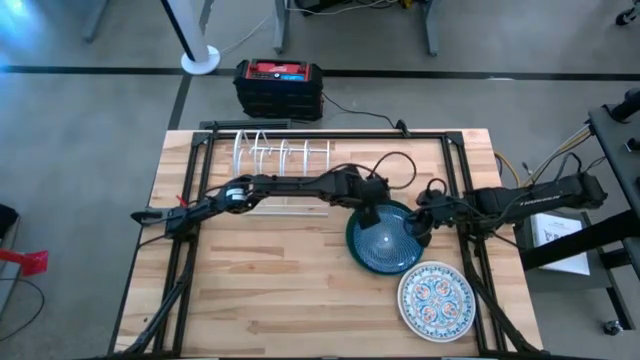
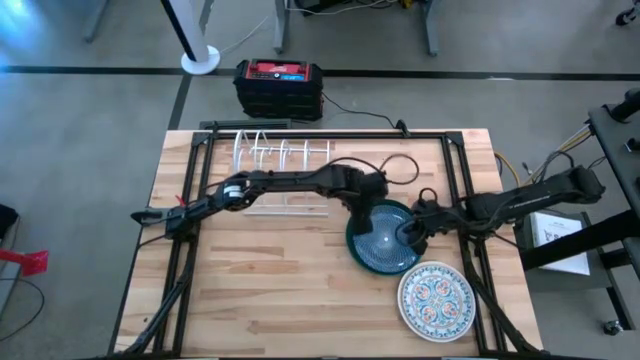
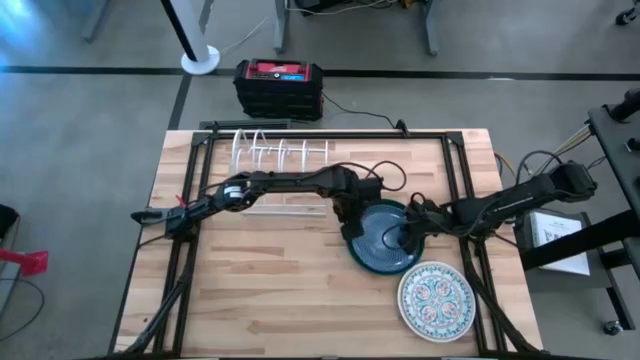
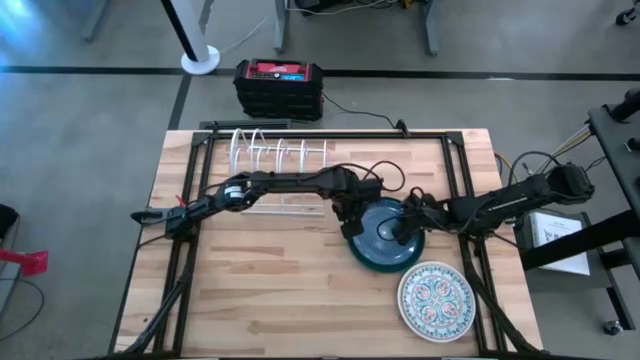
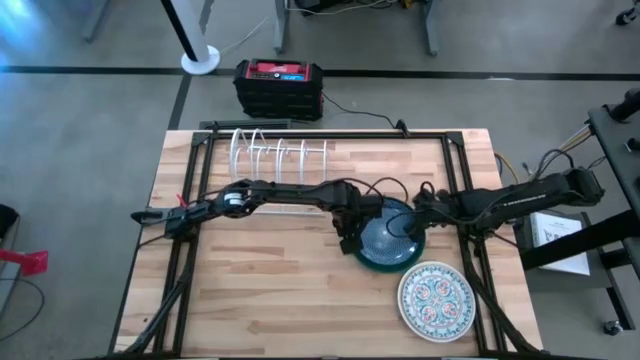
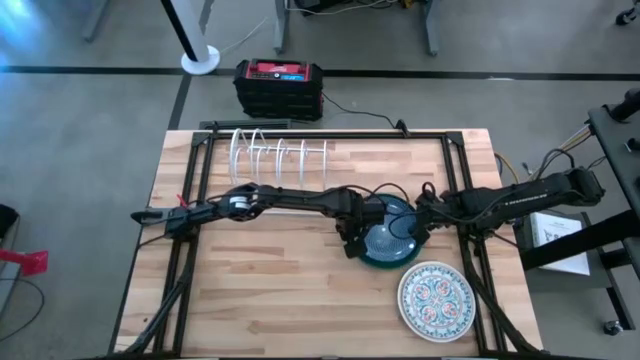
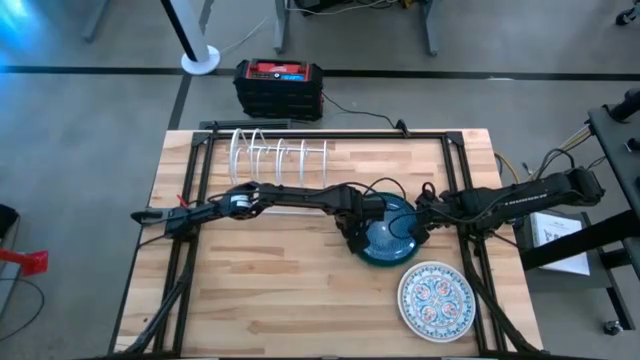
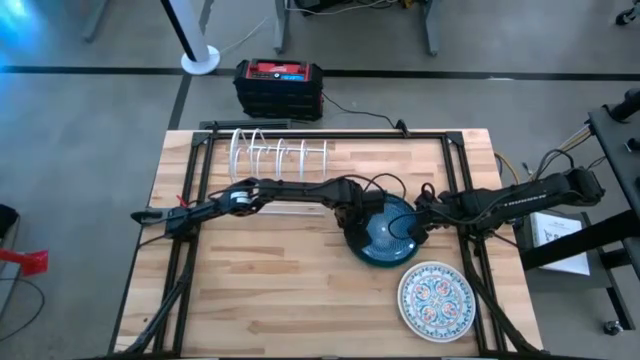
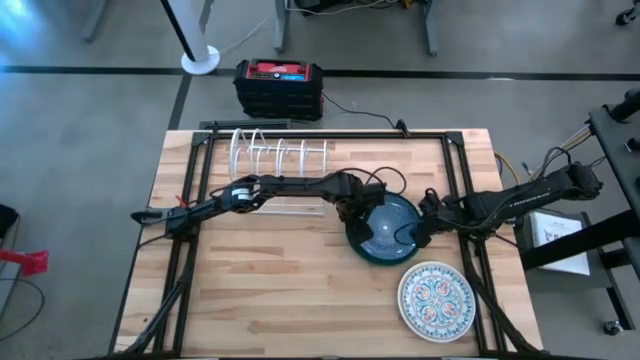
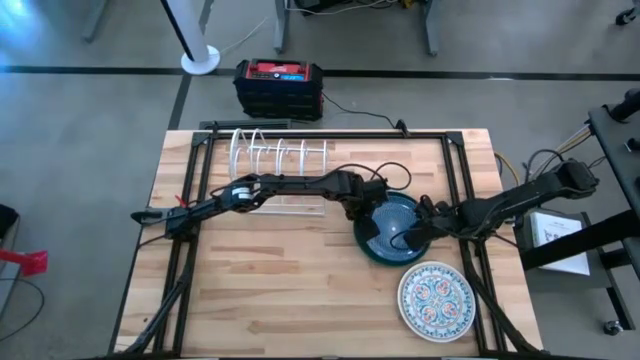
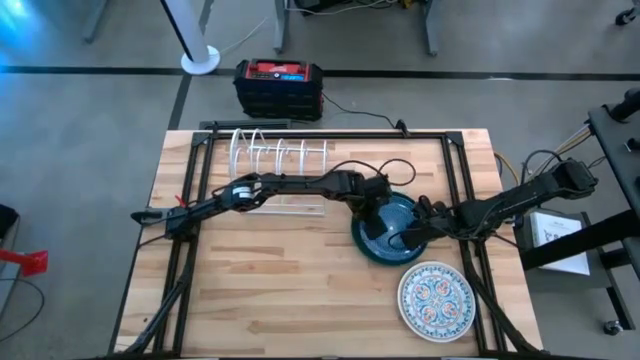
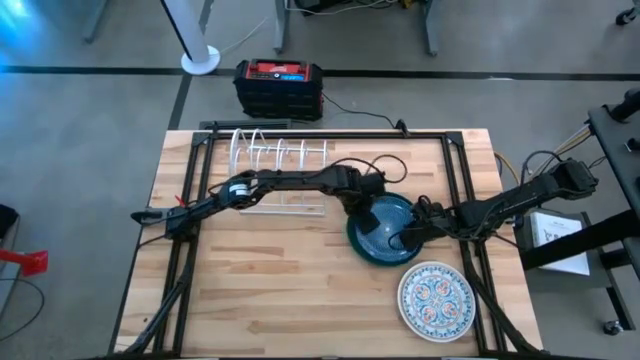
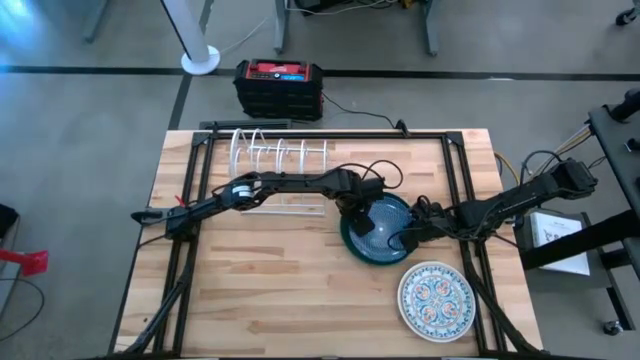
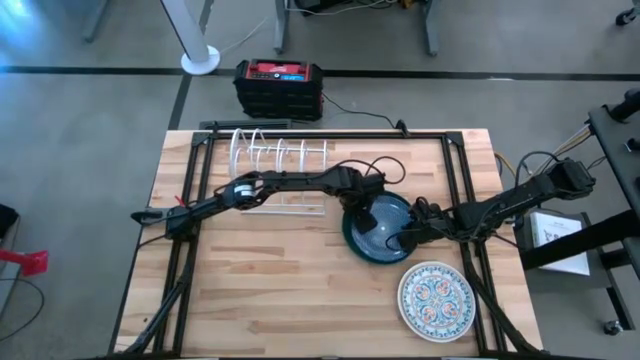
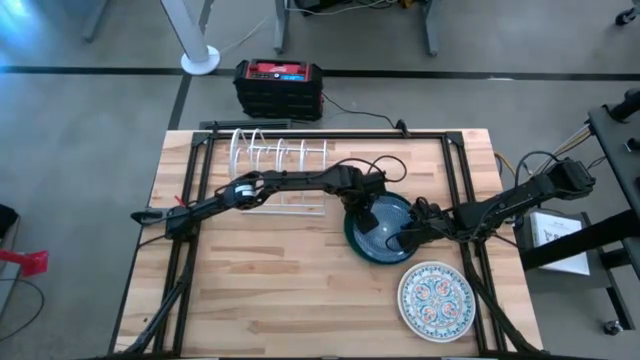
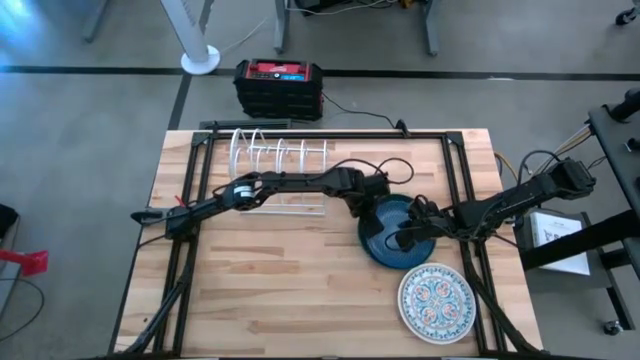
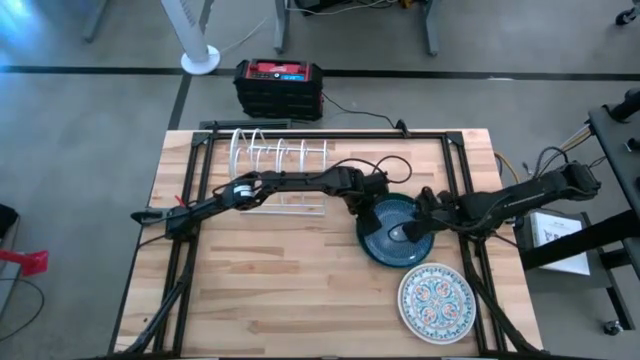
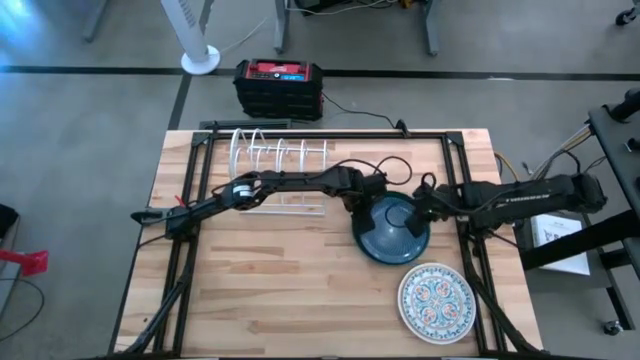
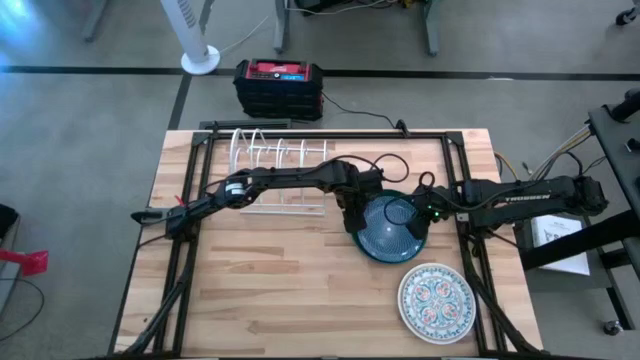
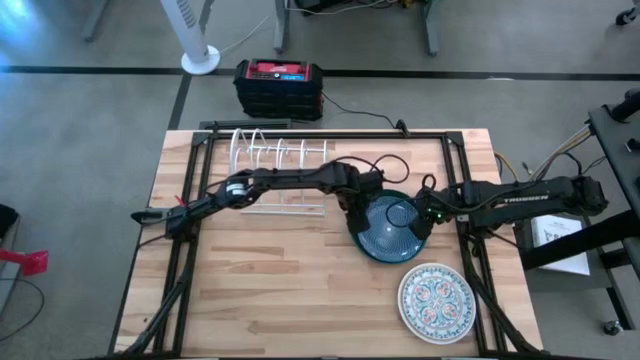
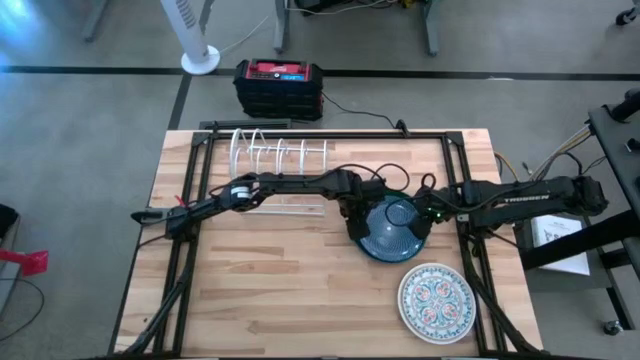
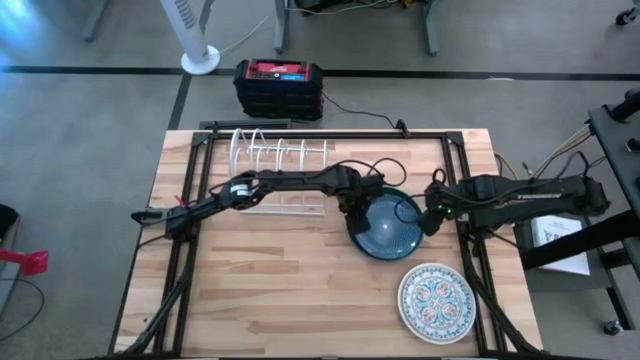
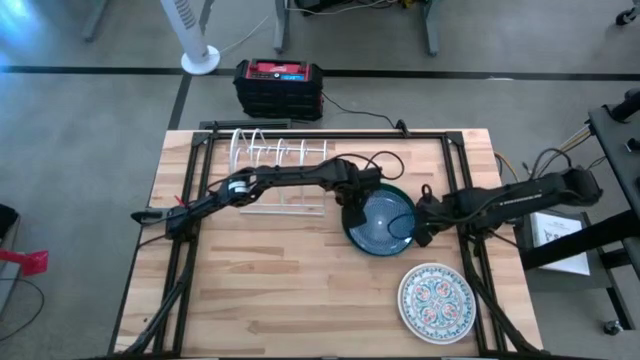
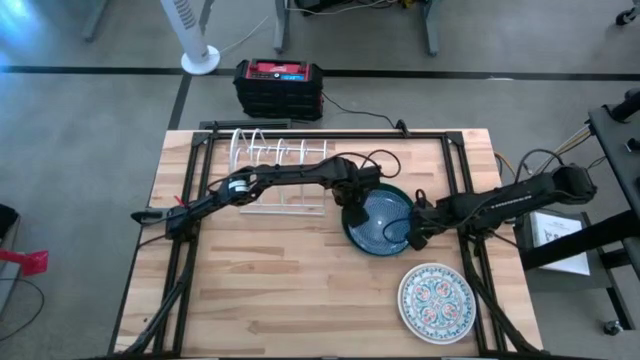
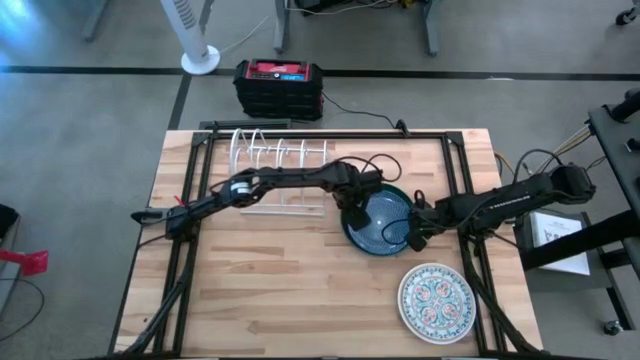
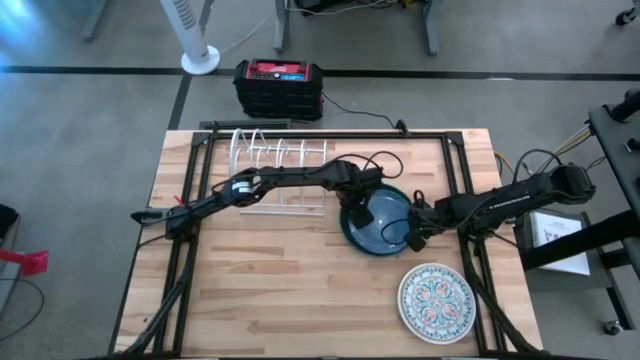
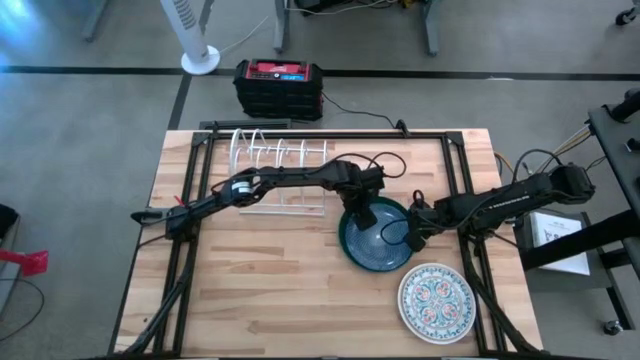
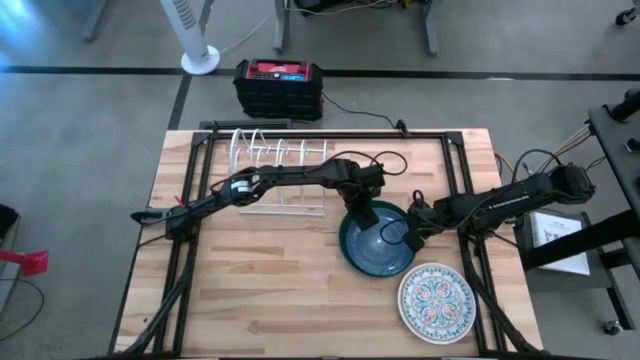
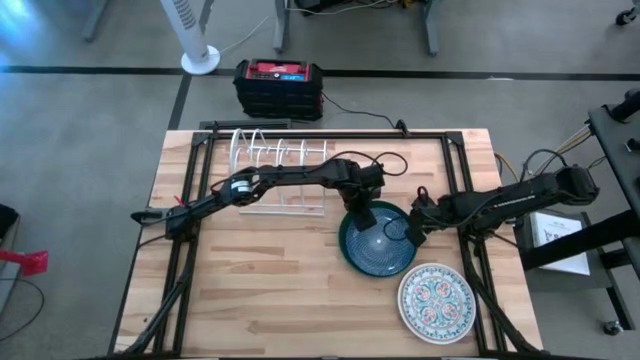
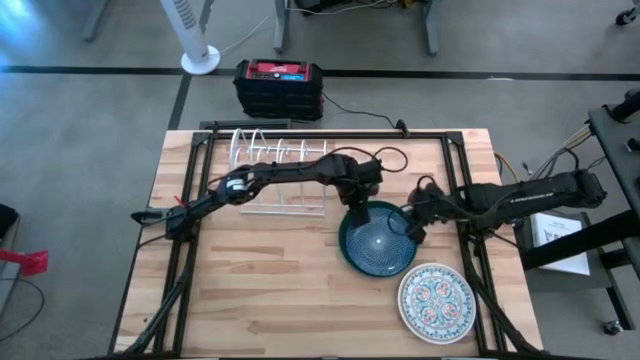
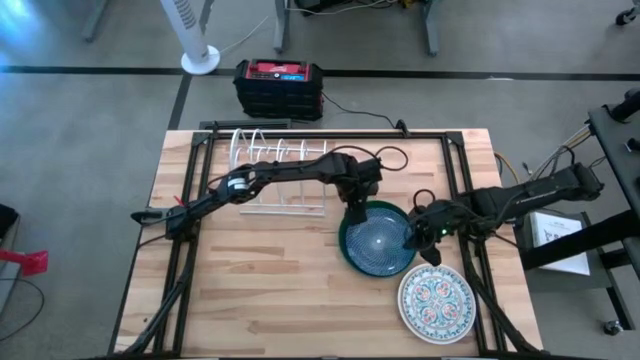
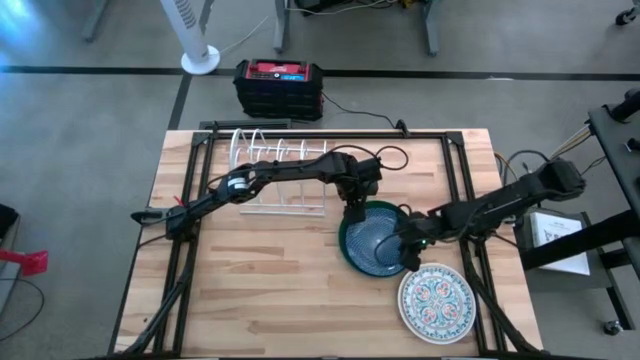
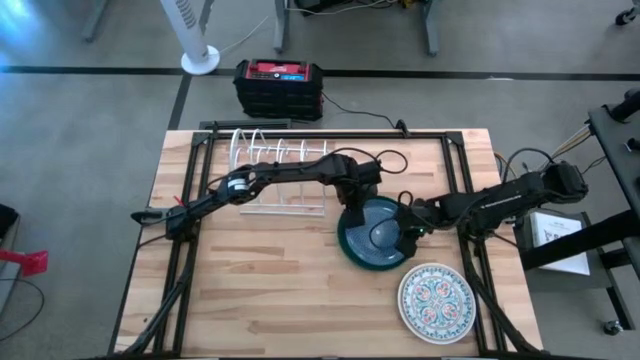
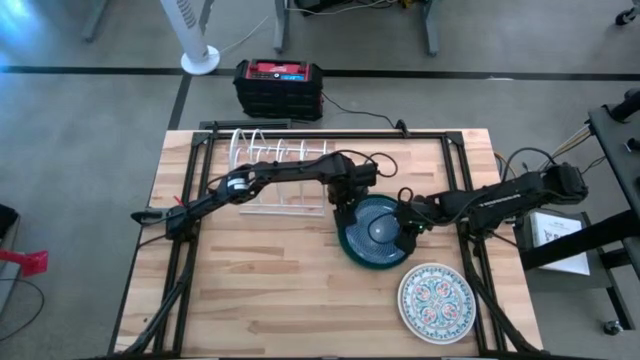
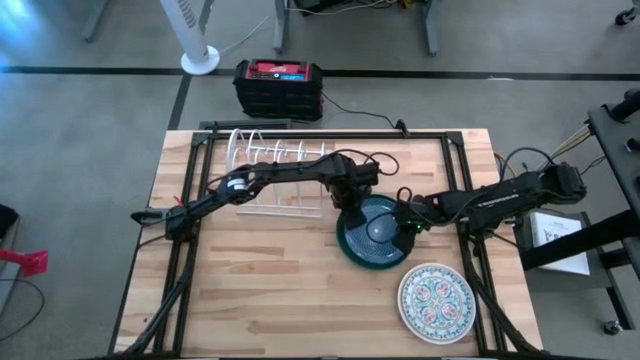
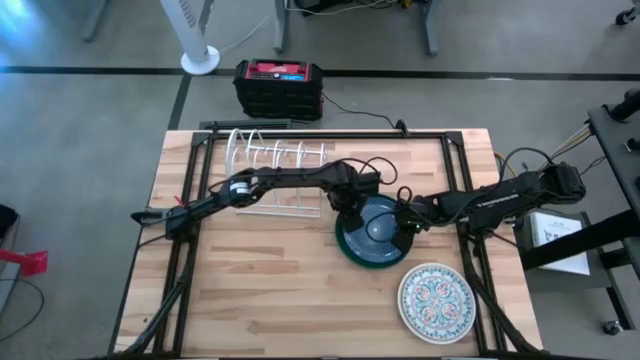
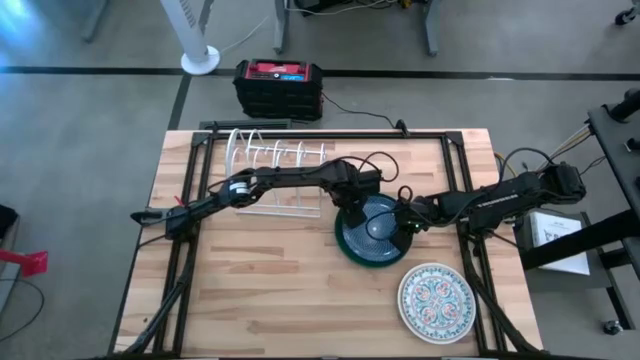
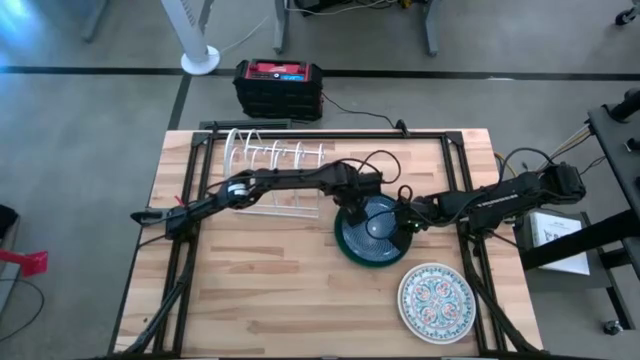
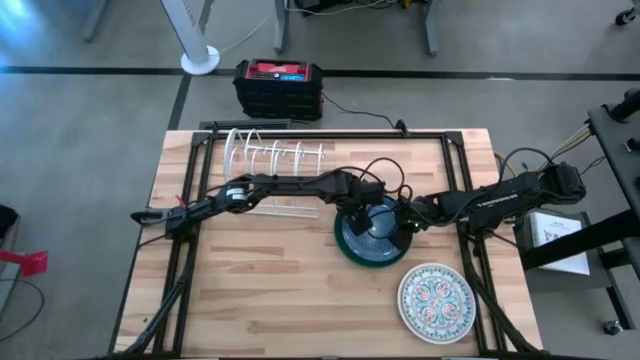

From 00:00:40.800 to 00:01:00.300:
Task: Sort dishes
Put the blue patterned plate in the dish rack

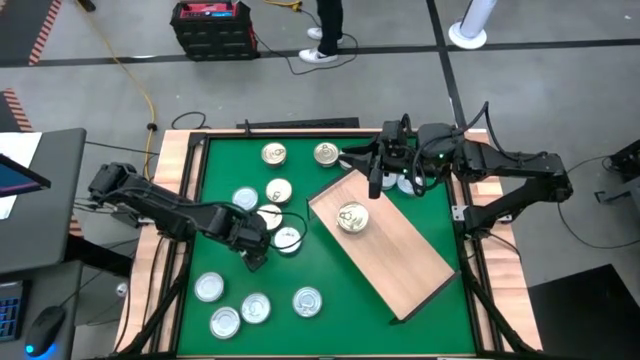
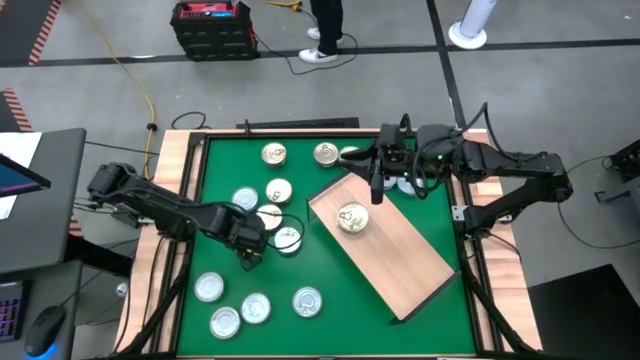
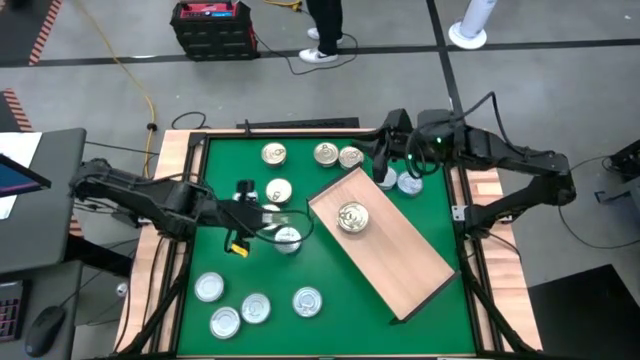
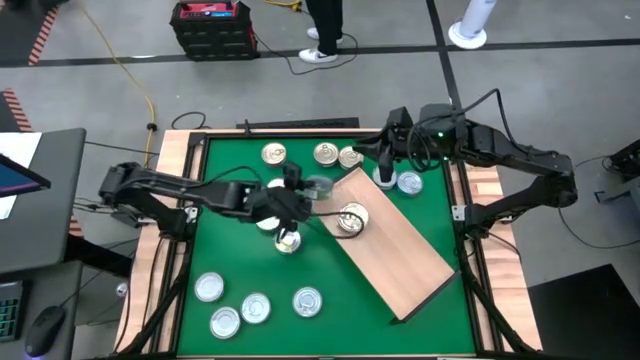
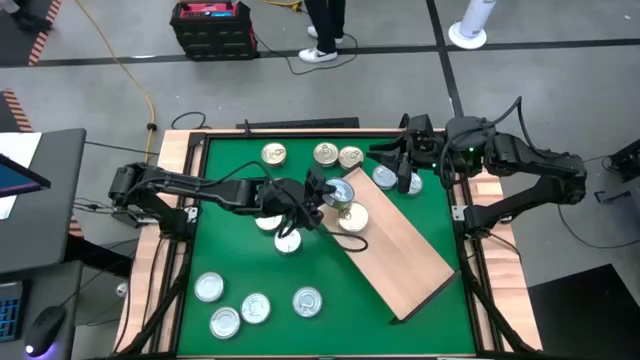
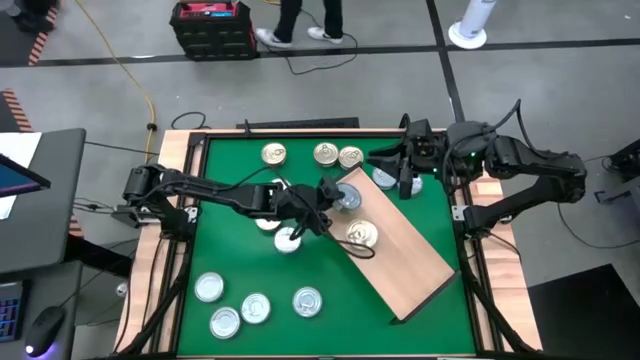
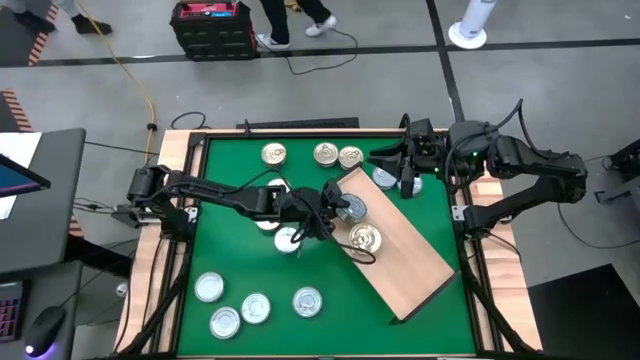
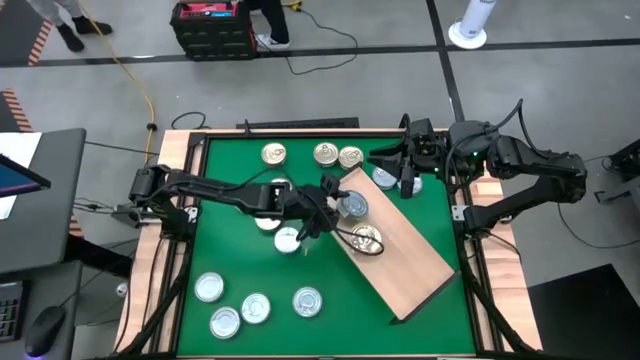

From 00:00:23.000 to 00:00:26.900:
Task: Stack canned seafood by type on shelf
Put the green tuna can on the shelf
